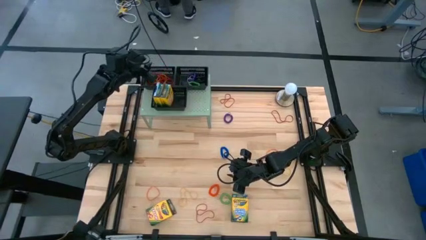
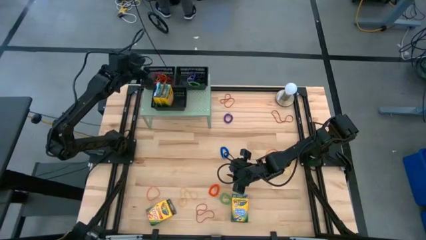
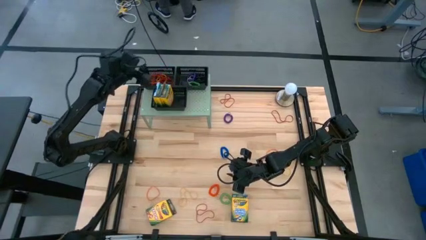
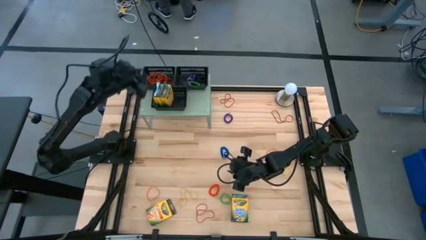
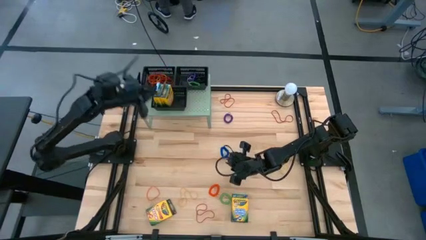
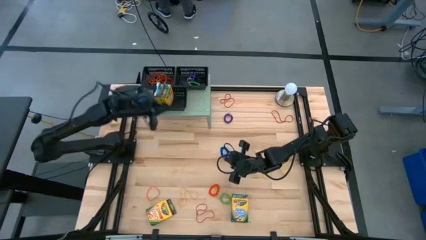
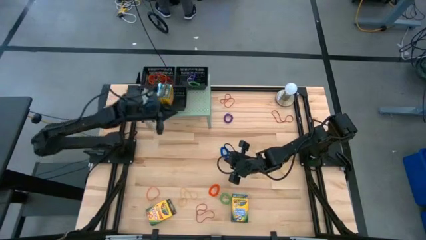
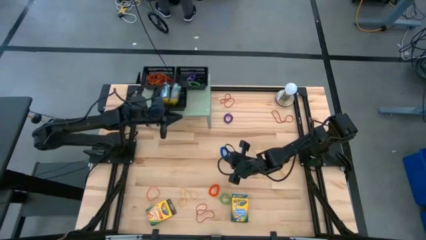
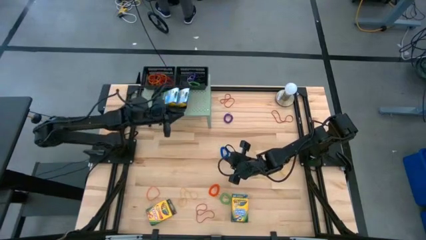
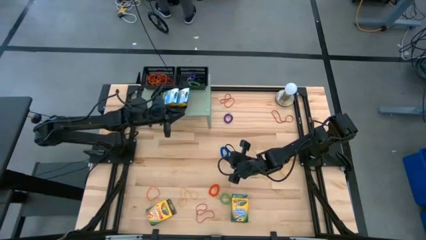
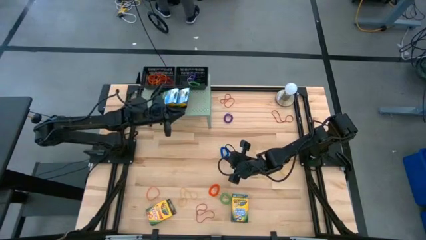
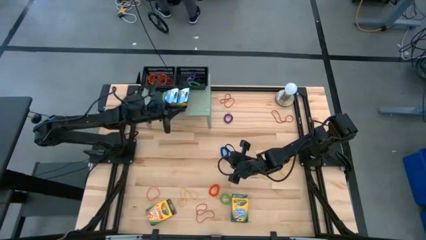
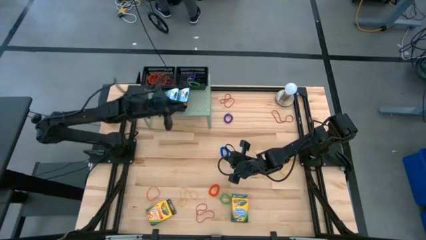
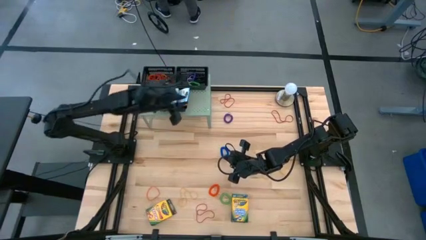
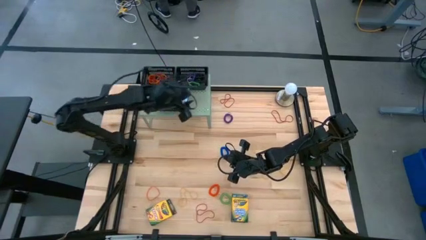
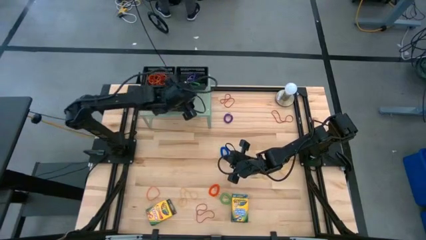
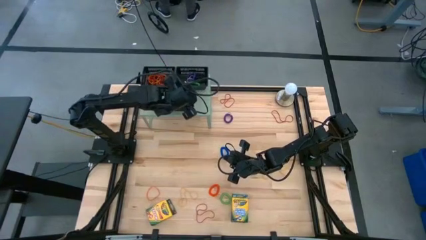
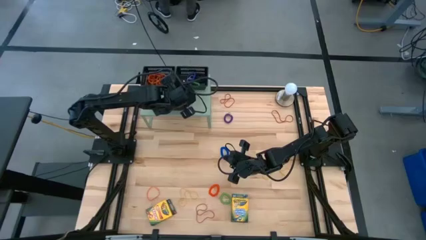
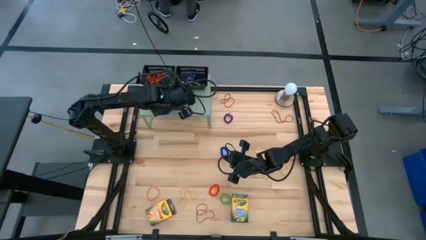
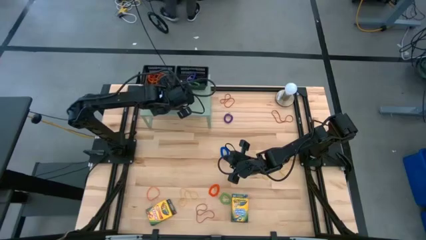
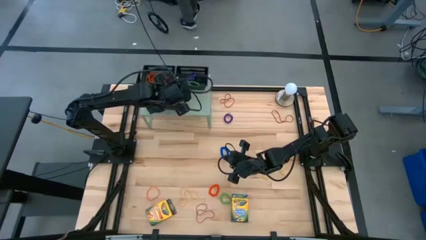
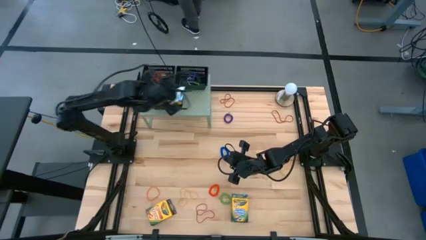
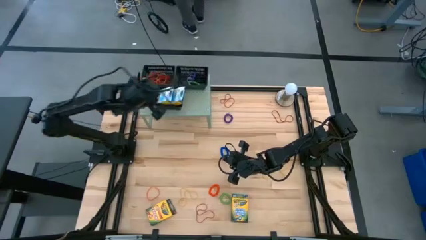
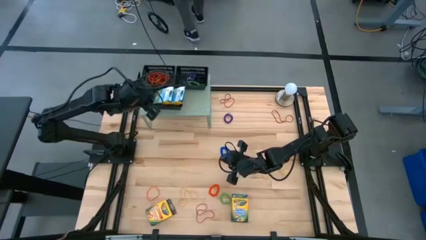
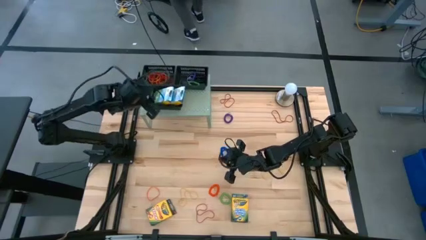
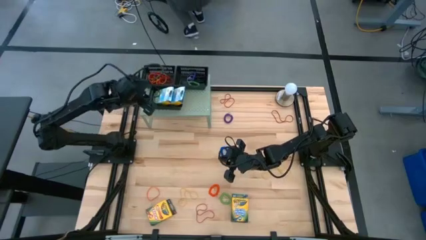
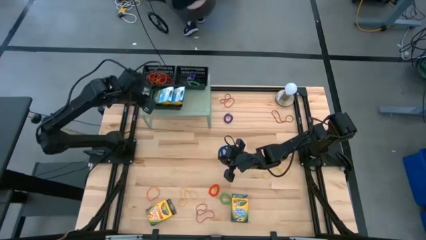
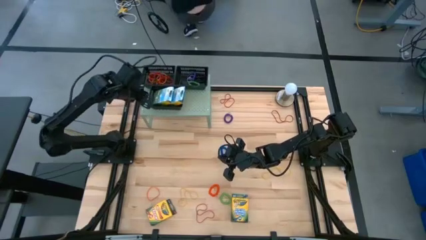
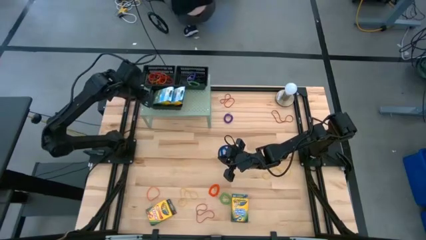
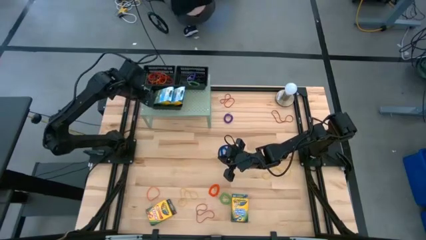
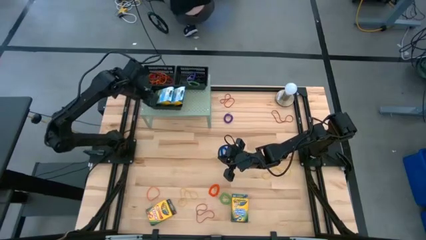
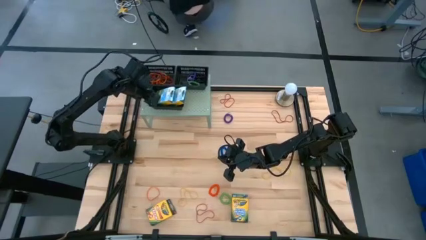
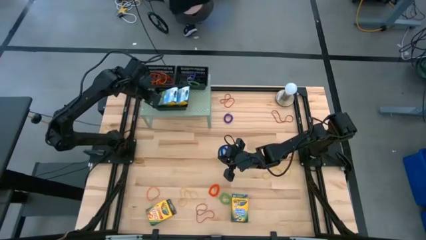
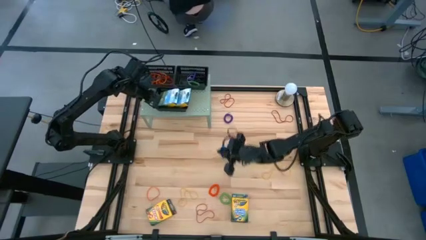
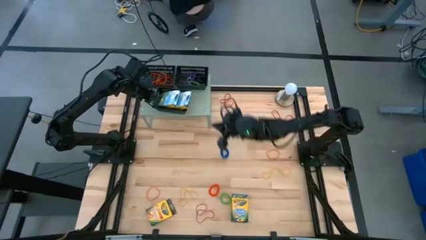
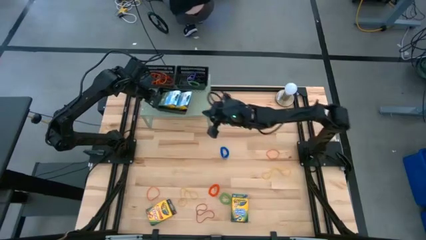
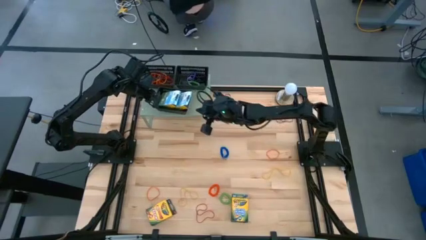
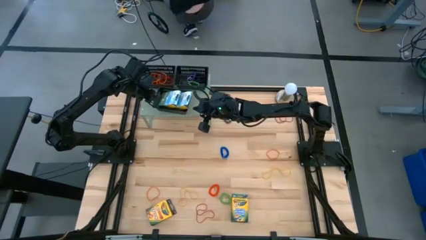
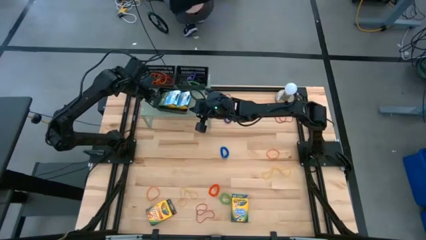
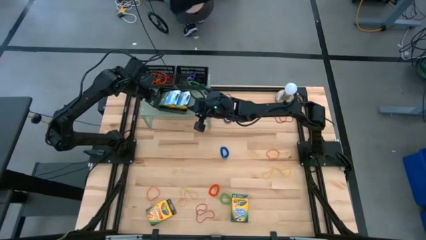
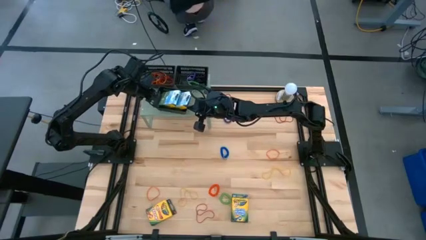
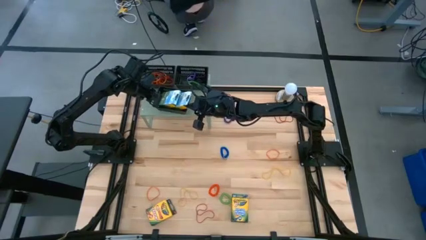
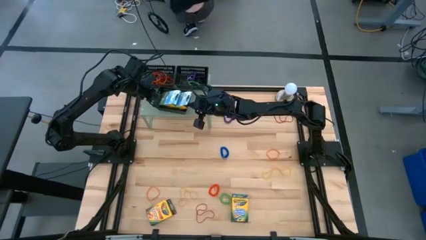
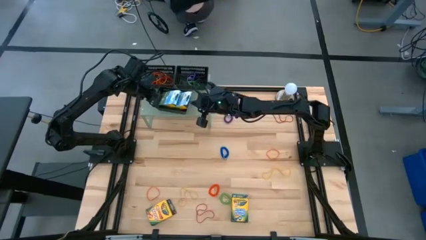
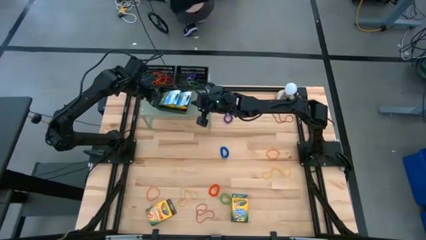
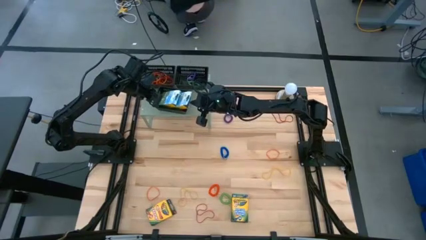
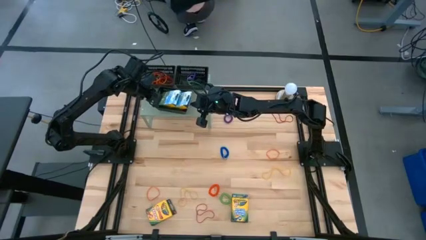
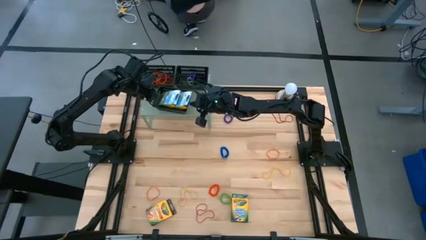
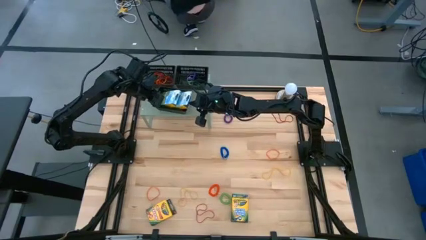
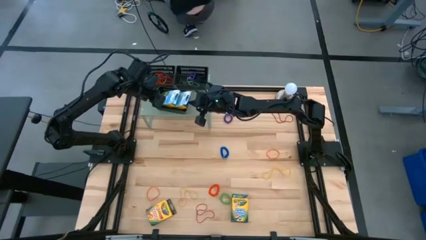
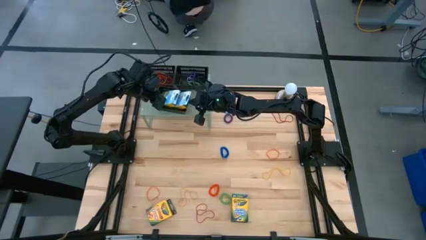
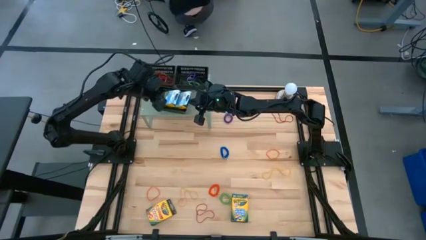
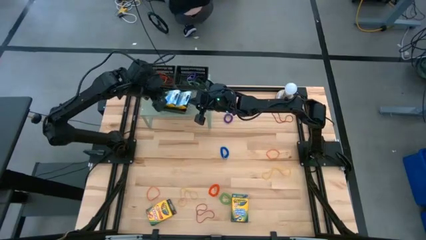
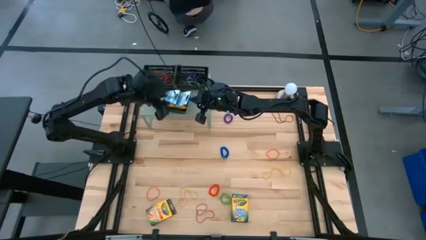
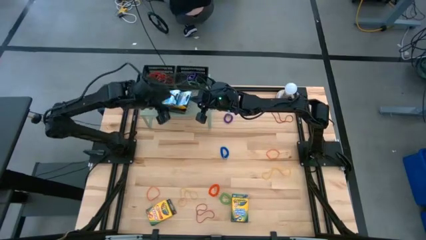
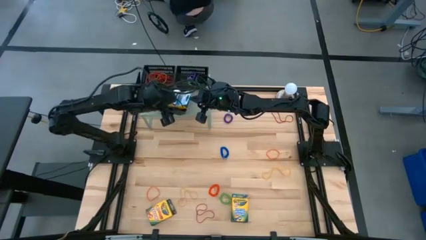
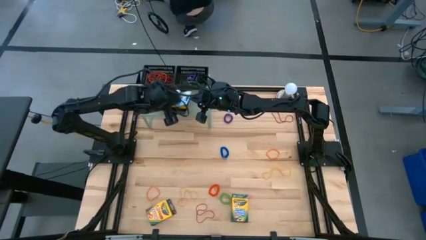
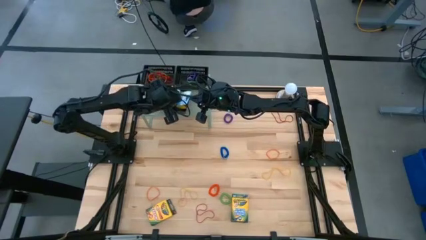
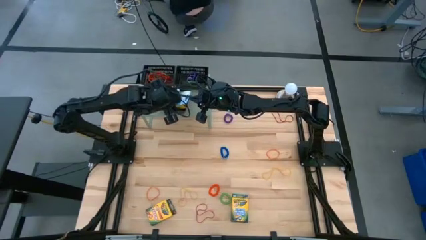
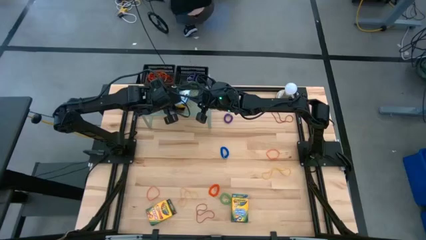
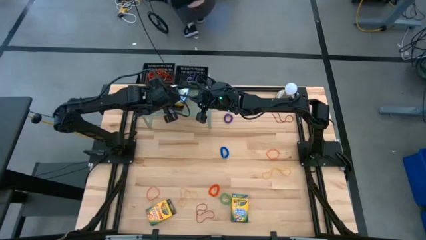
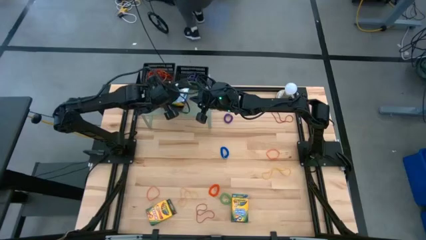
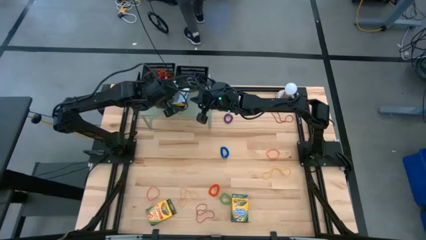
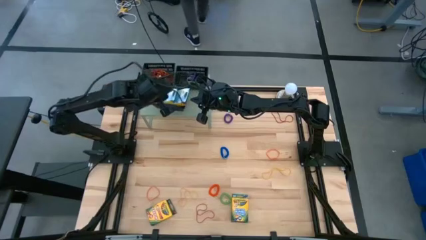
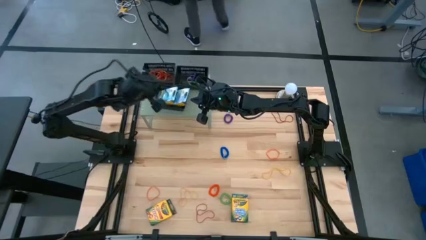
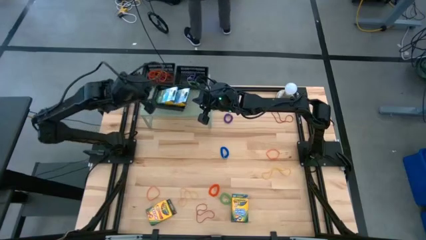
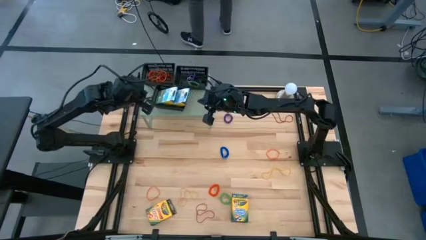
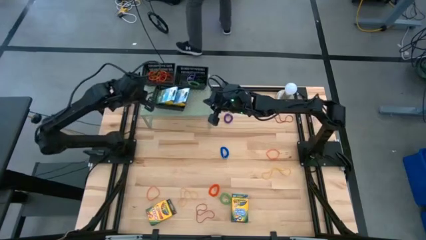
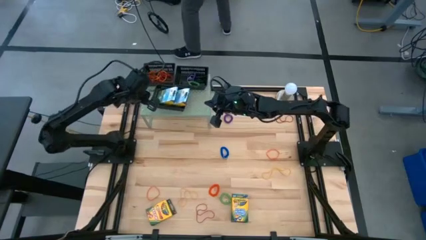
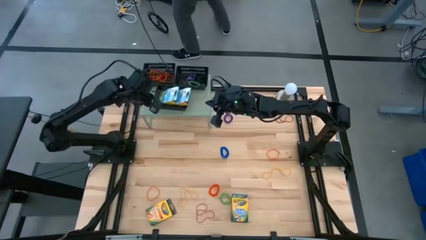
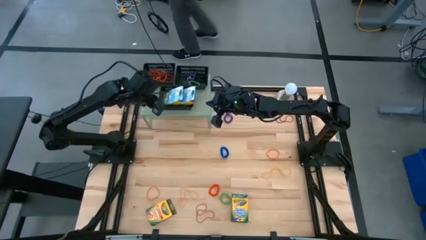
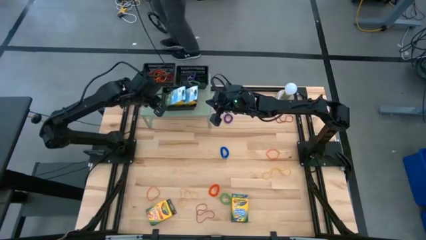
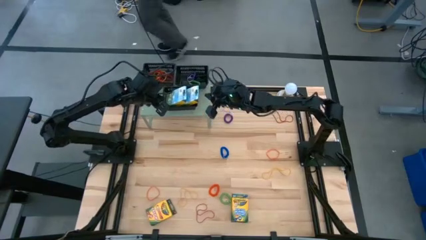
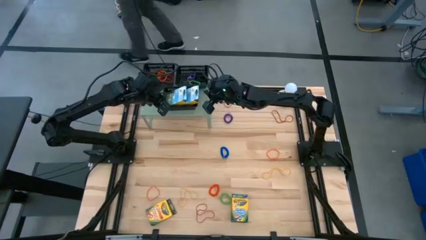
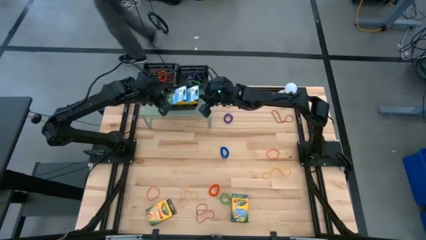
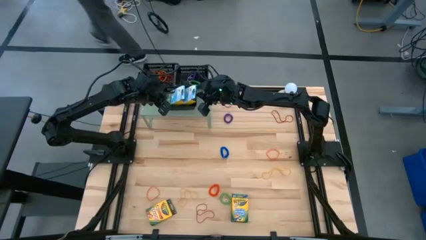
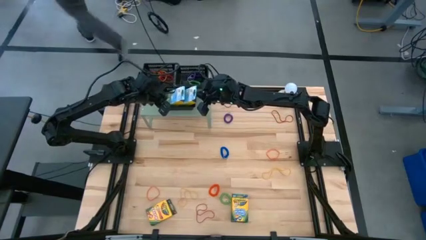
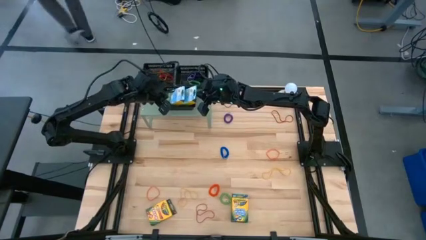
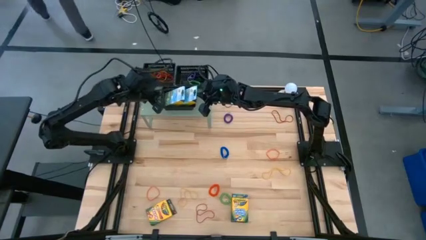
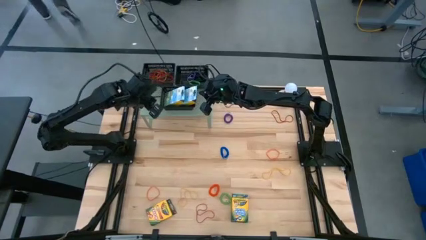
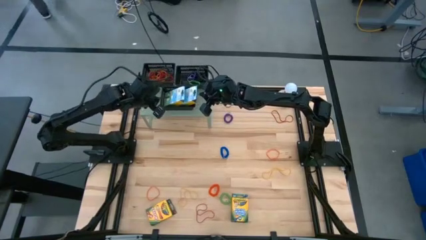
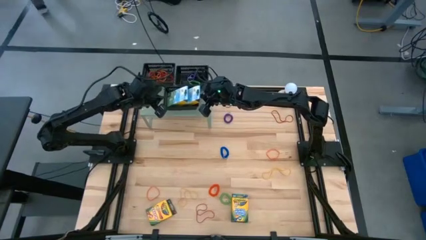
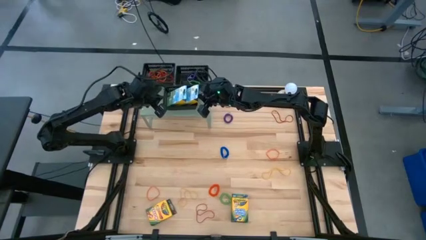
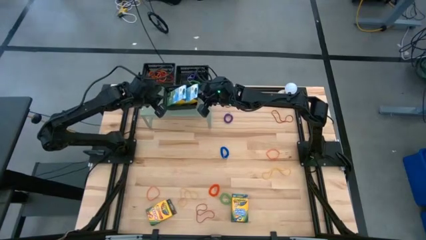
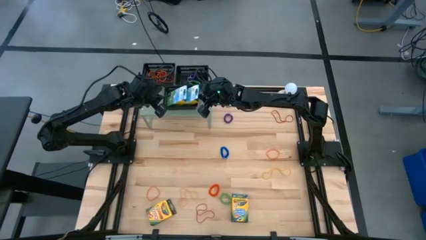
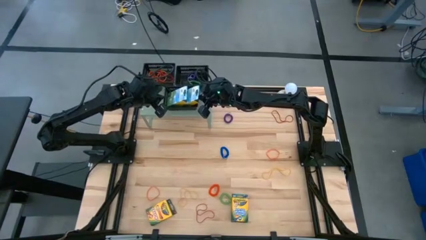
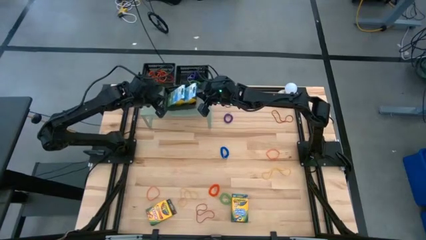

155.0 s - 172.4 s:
Task: Pick & Place Office Desk Supplies
Adjust the bottom black bin on the shelf
